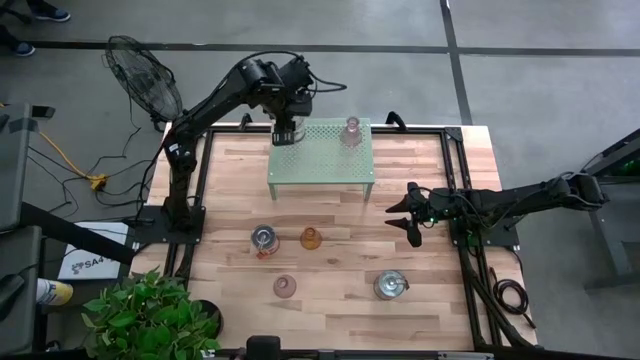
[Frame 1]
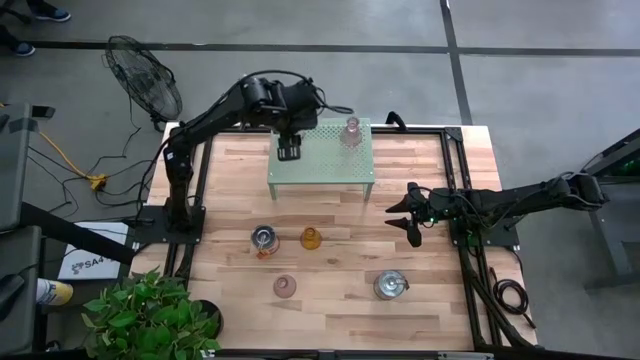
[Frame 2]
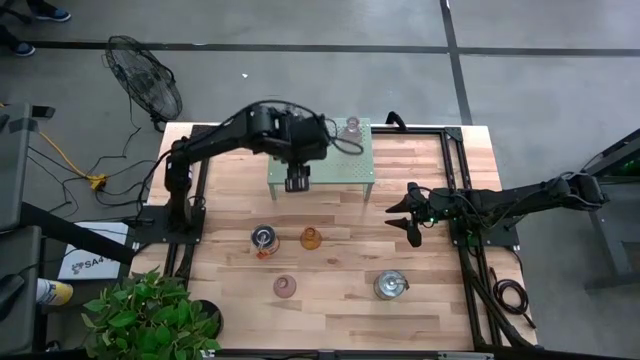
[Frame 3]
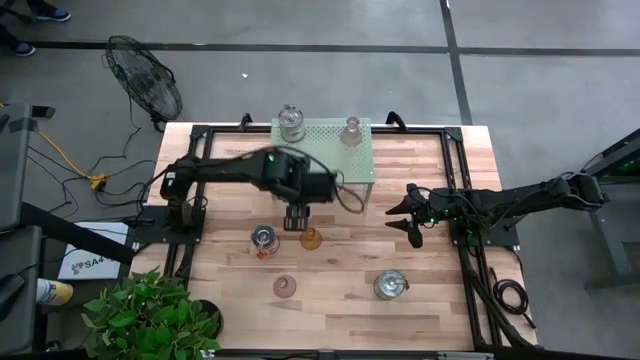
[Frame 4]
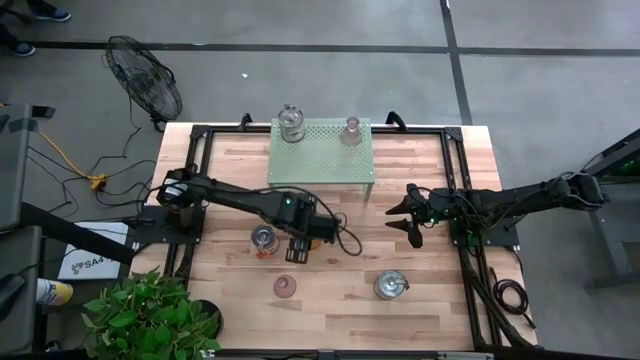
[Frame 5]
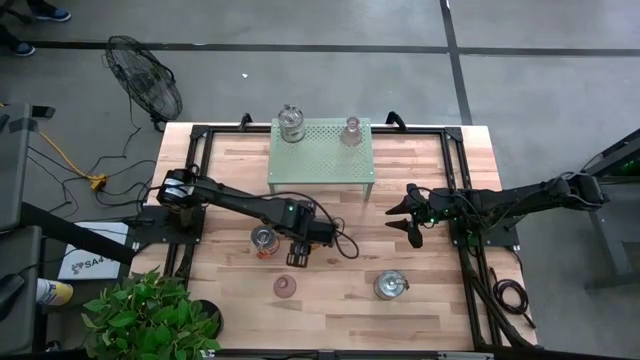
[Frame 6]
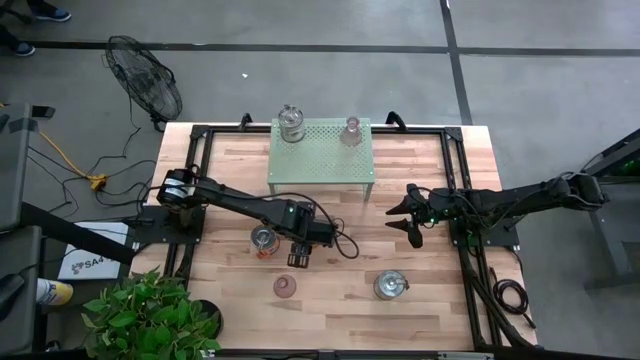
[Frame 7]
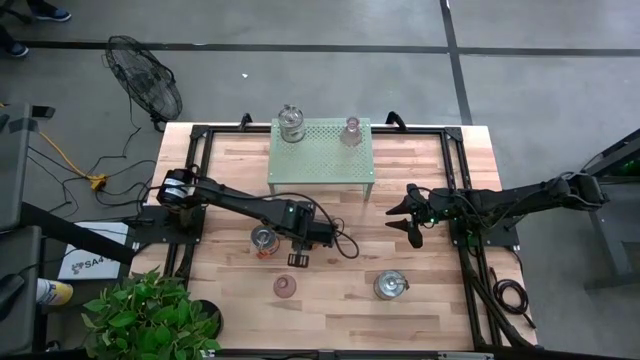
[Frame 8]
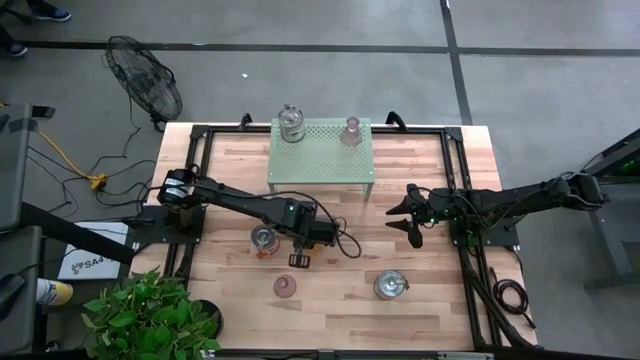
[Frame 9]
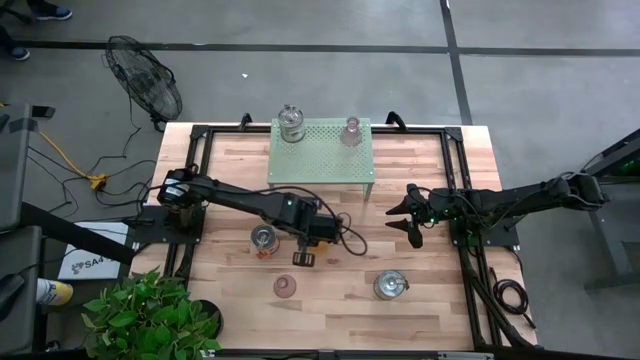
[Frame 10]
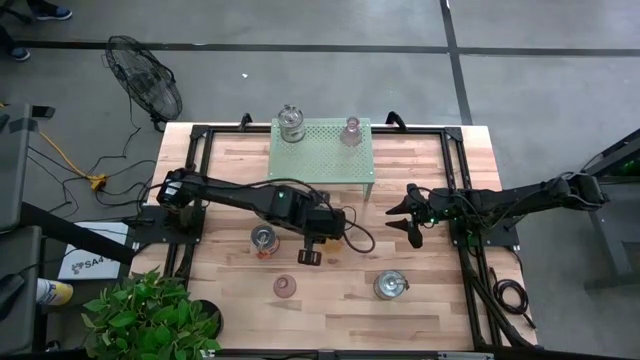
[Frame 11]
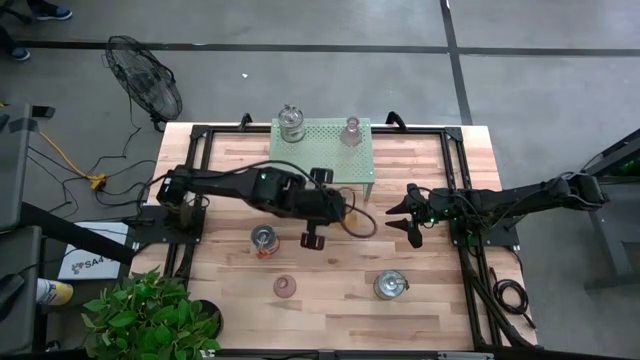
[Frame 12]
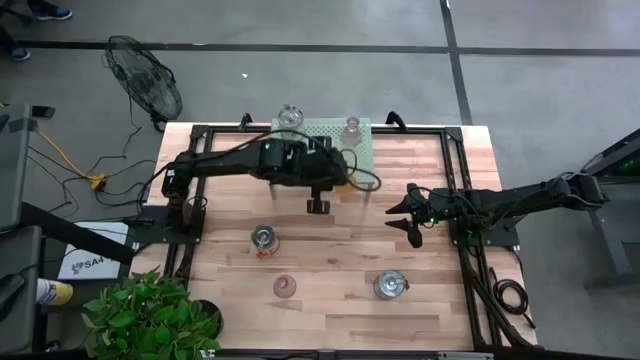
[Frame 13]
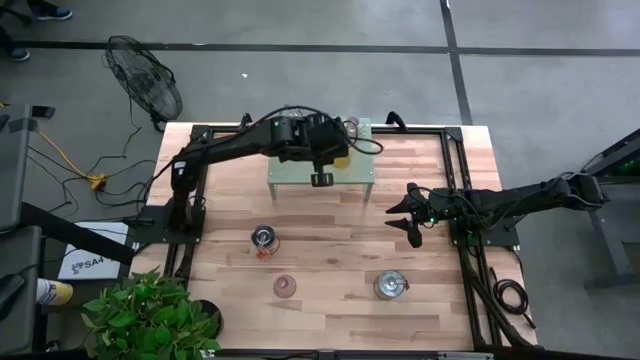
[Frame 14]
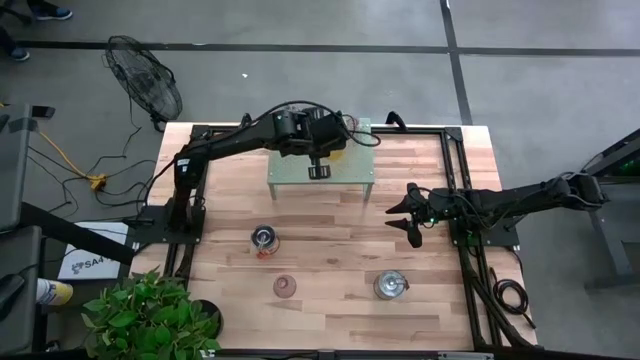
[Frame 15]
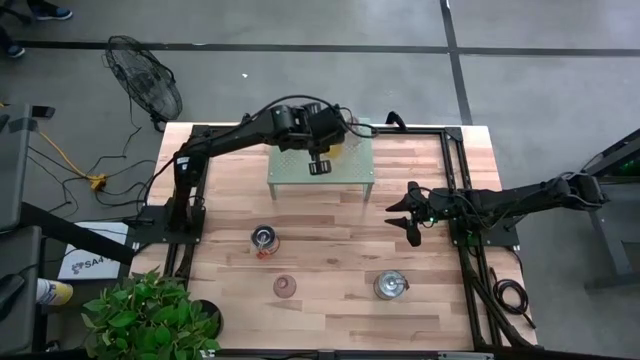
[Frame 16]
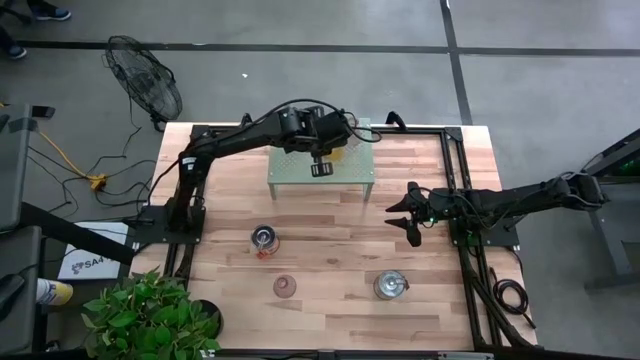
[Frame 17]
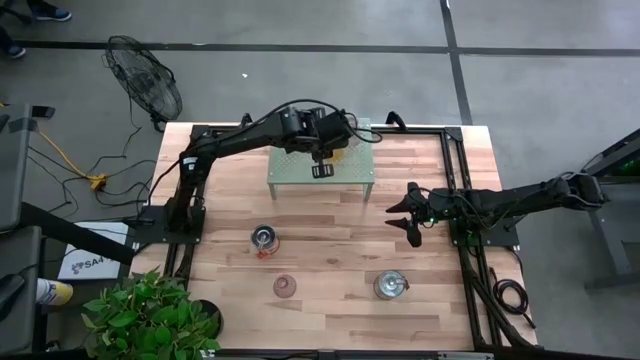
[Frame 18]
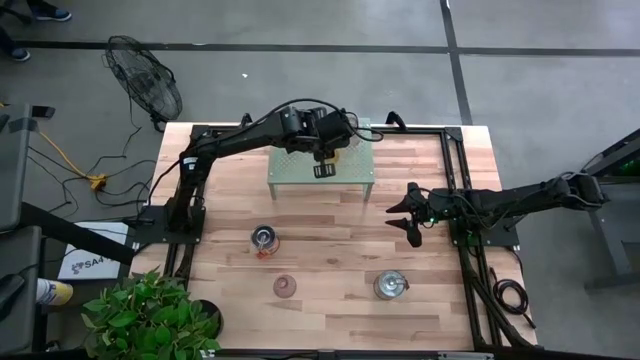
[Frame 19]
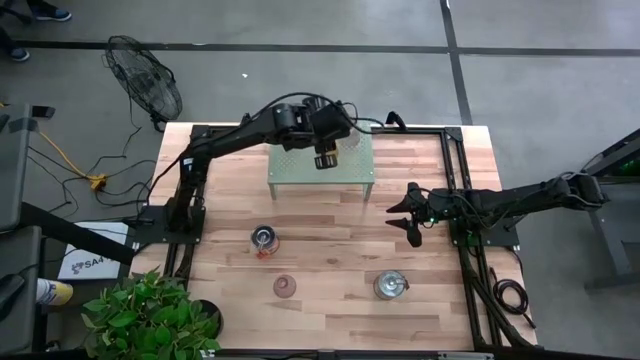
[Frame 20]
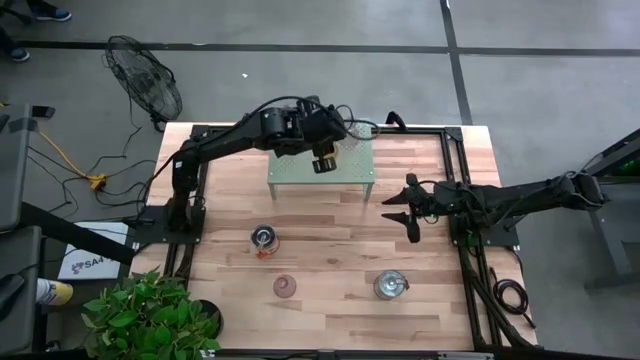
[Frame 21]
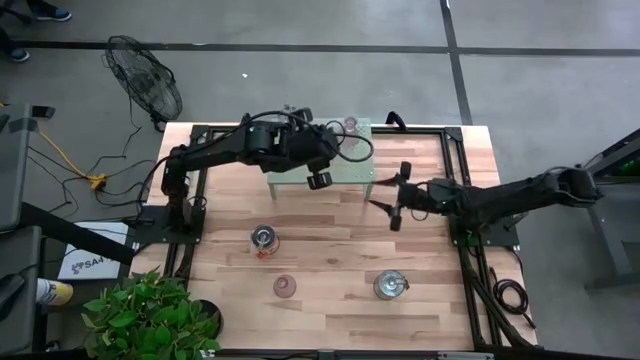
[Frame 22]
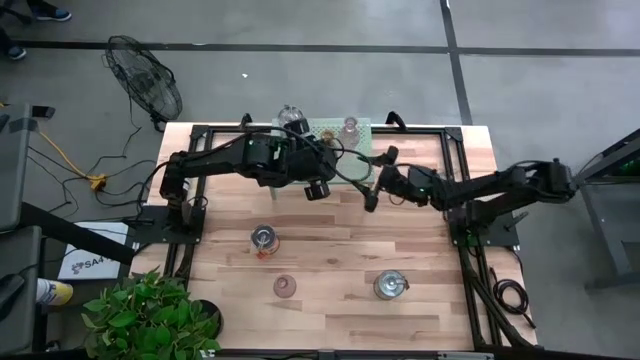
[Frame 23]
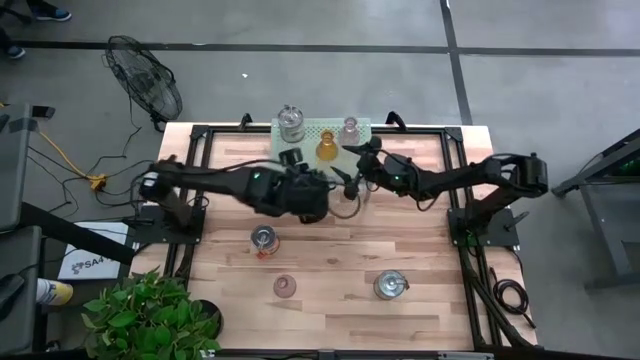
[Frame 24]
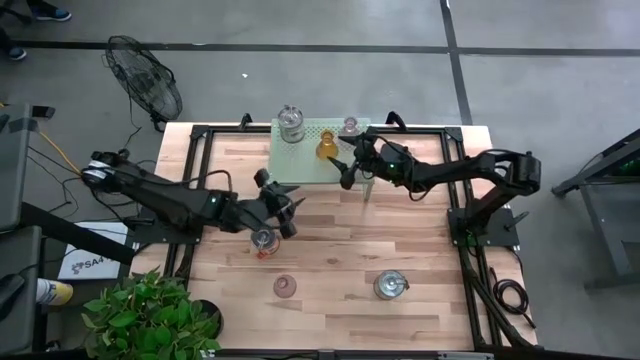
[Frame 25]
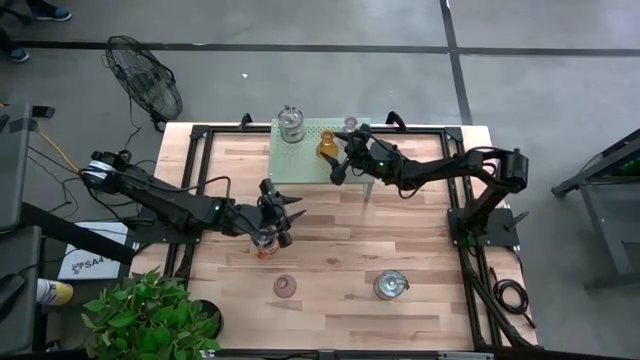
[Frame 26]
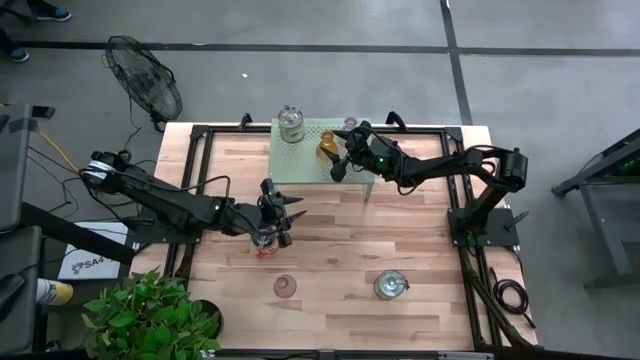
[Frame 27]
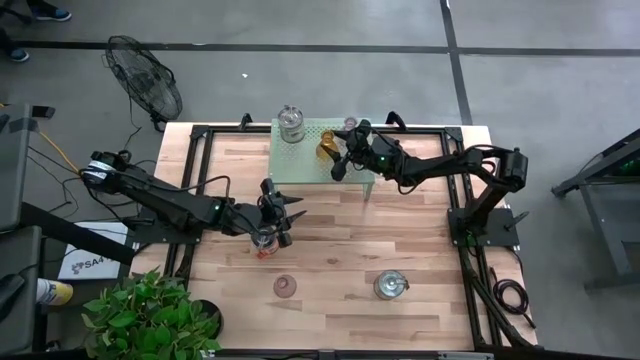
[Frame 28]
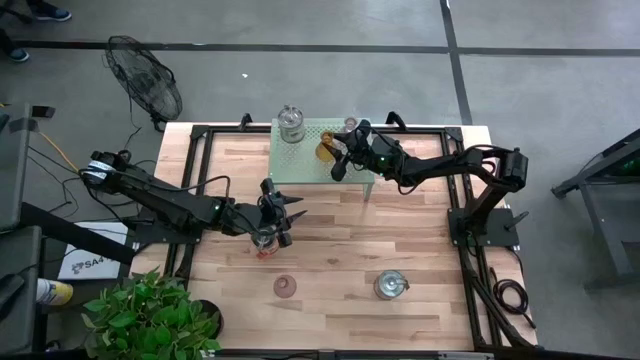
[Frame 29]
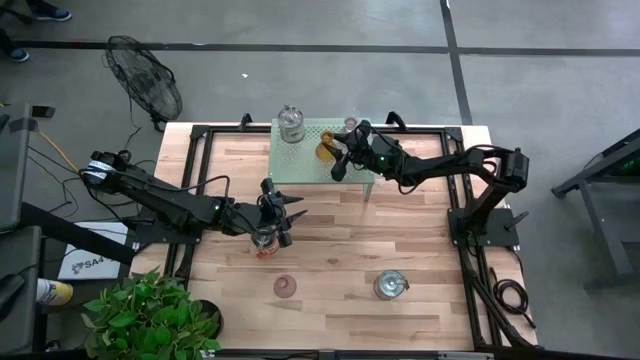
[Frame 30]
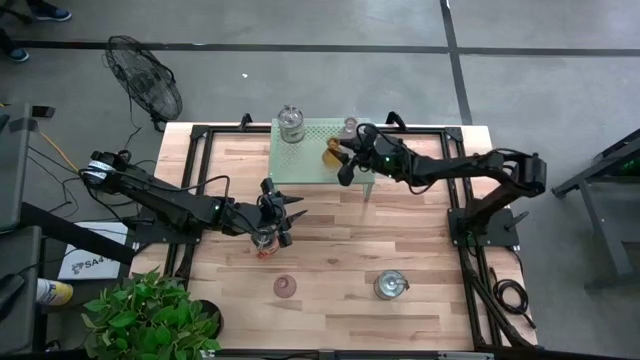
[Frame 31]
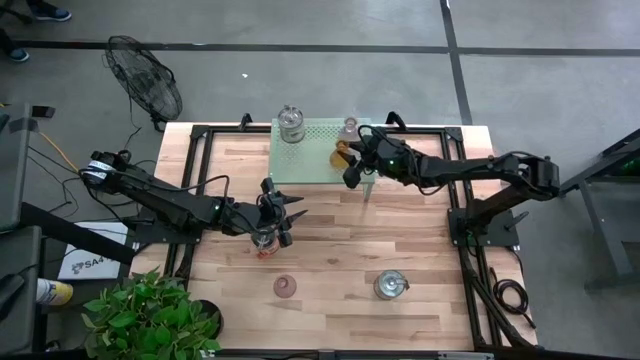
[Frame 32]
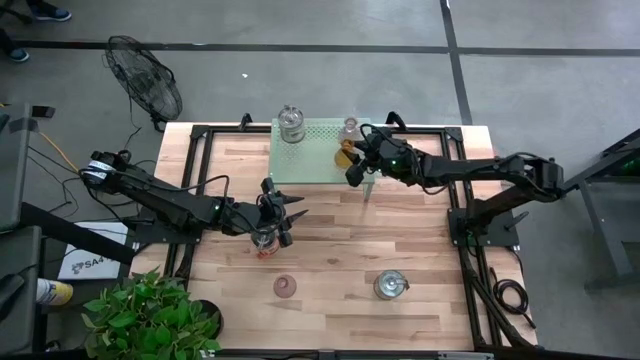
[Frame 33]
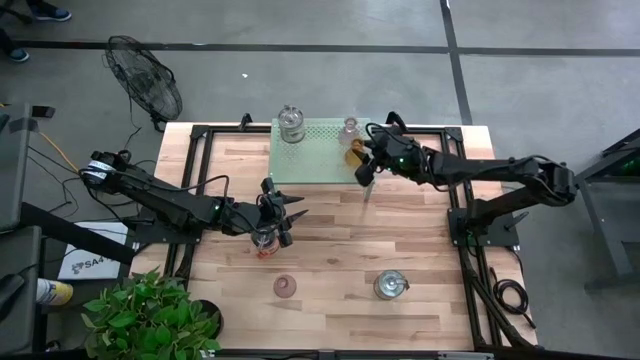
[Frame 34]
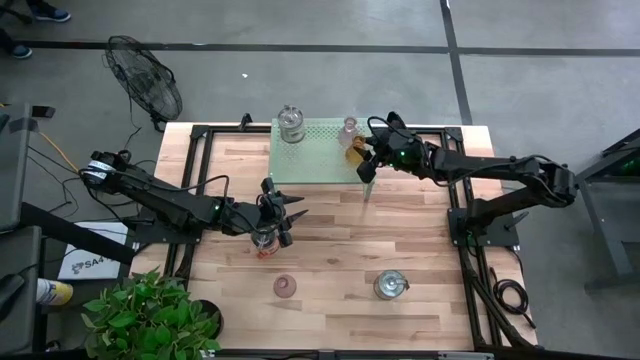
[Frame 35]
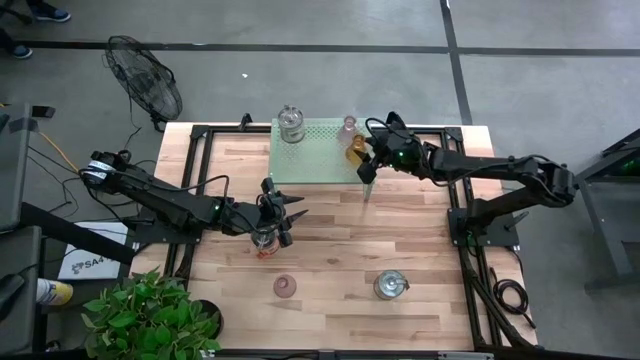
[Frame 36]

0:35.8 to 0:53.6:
Task: Pick & Place candle stick holders
Put the yellow glass candle holder on the shelf

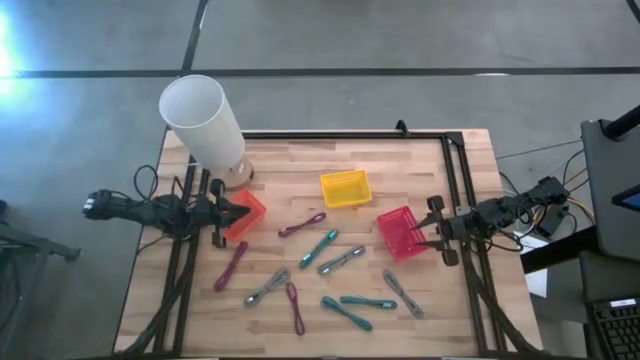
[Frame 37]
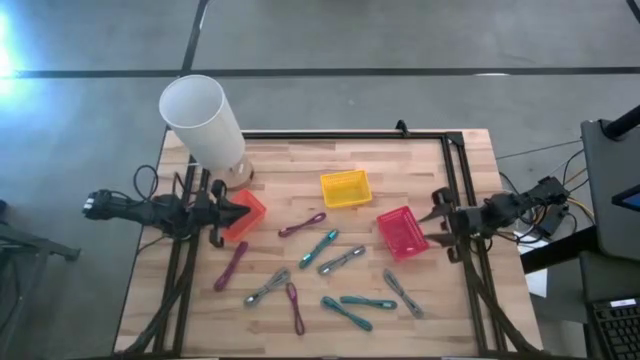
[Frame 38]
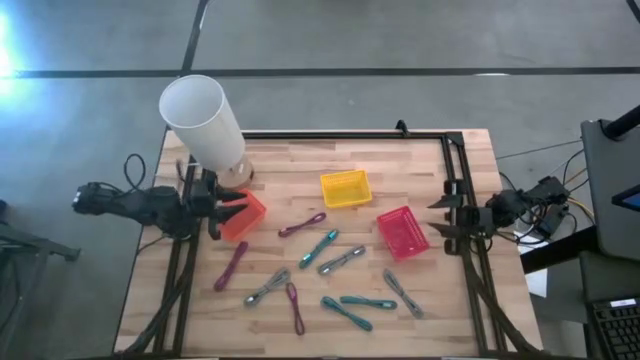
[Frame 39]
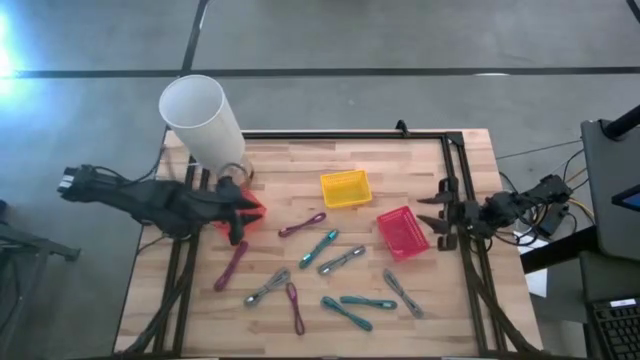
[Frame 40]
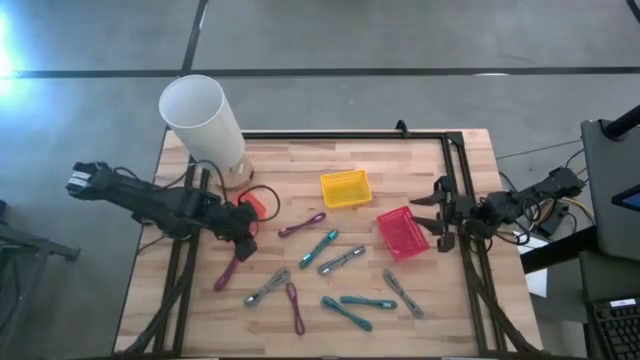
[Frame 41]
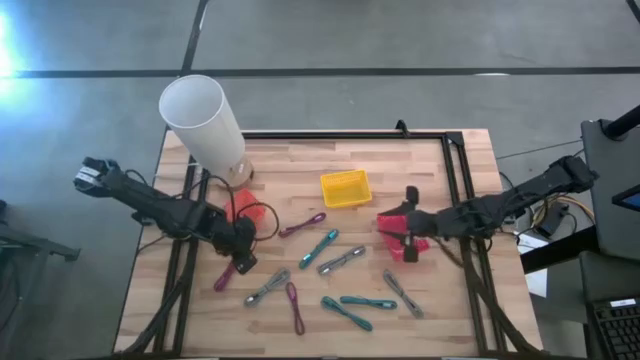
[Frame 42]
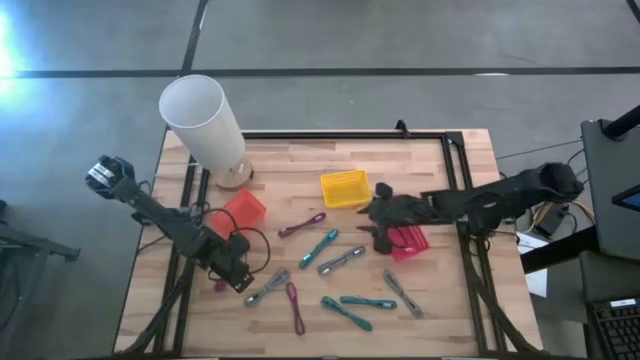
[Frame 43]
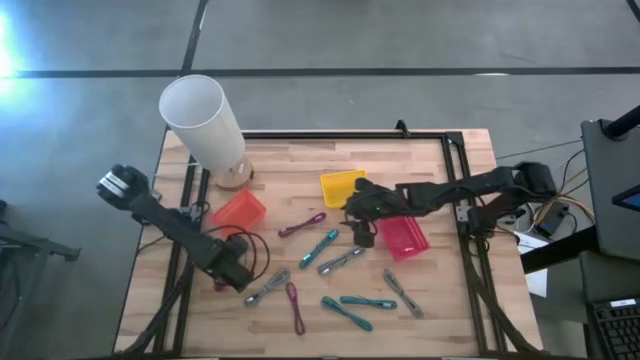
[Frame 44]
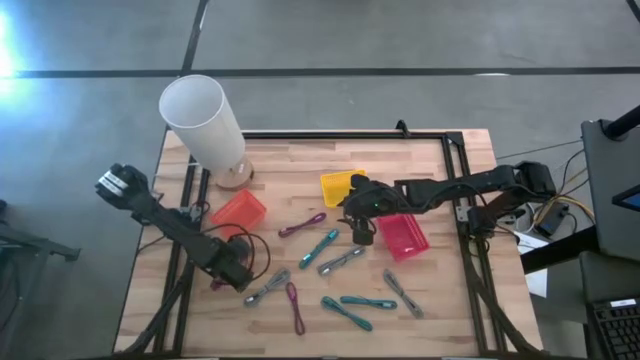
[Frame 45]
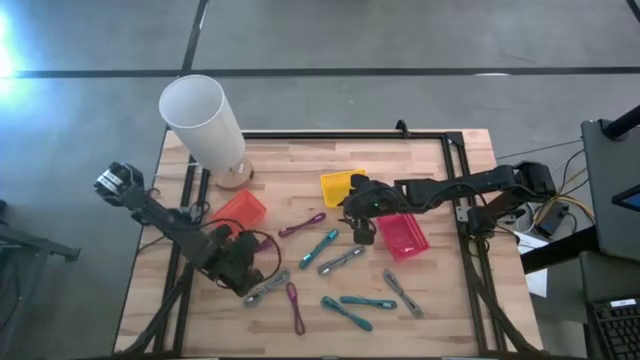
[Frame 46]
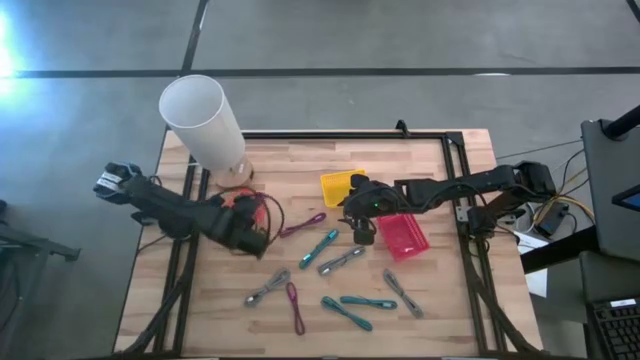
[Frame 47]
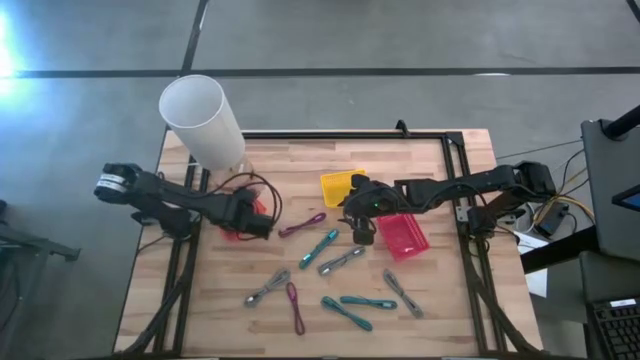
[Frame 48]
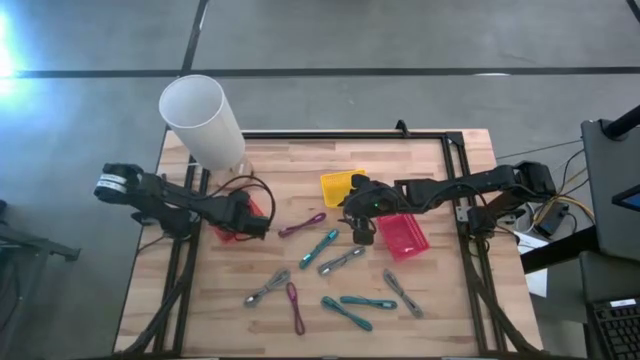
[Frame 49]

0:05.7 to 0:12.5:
Task: Pick & Place USB Port
Put the left pink patterned charger cable into the orange bin
